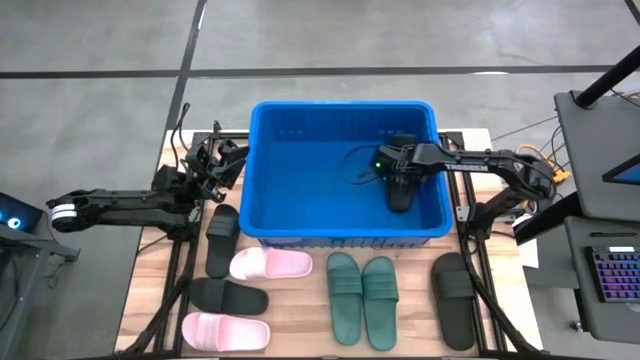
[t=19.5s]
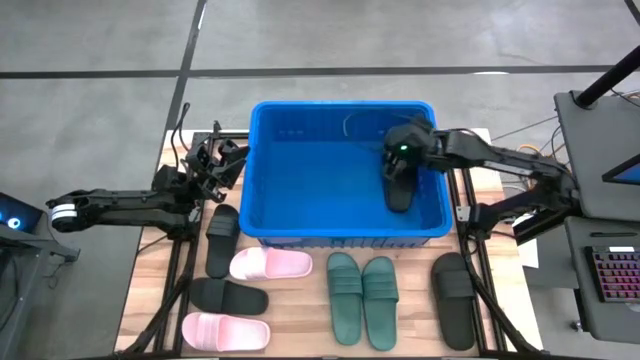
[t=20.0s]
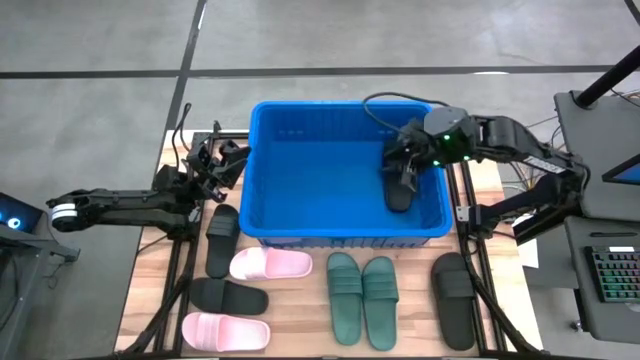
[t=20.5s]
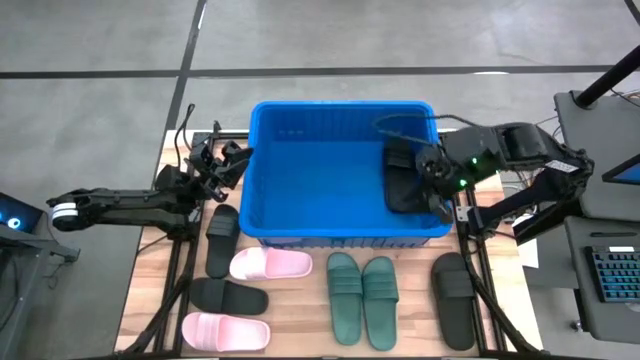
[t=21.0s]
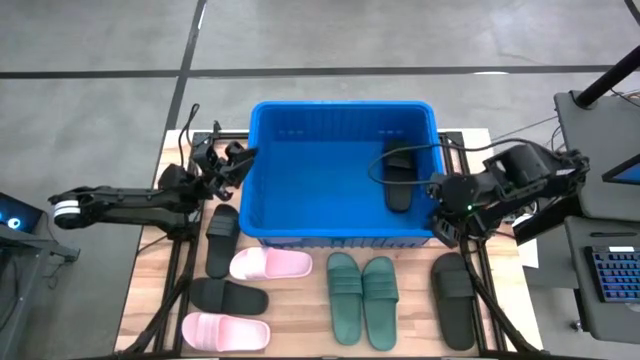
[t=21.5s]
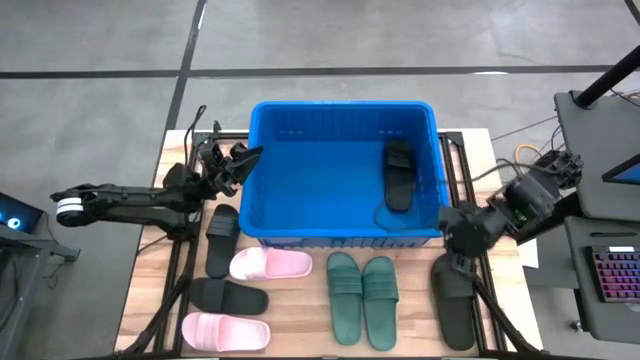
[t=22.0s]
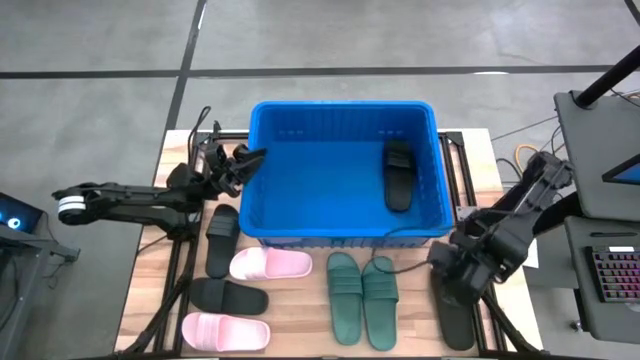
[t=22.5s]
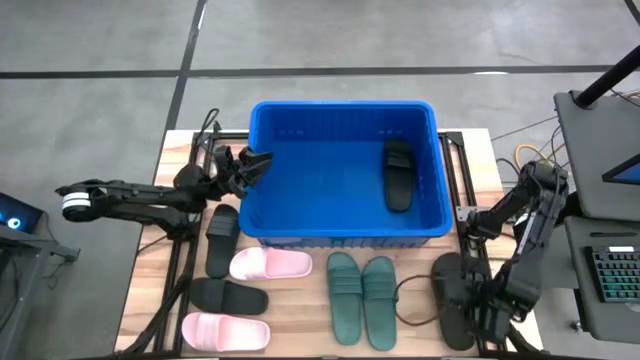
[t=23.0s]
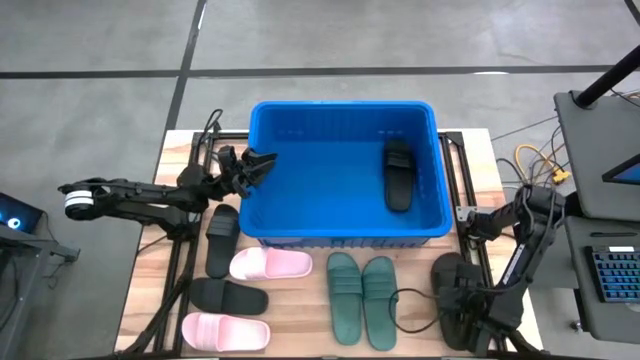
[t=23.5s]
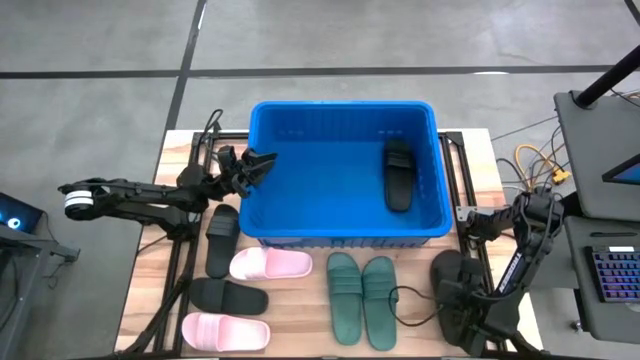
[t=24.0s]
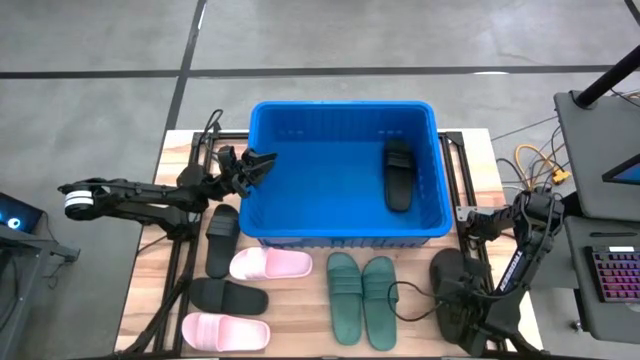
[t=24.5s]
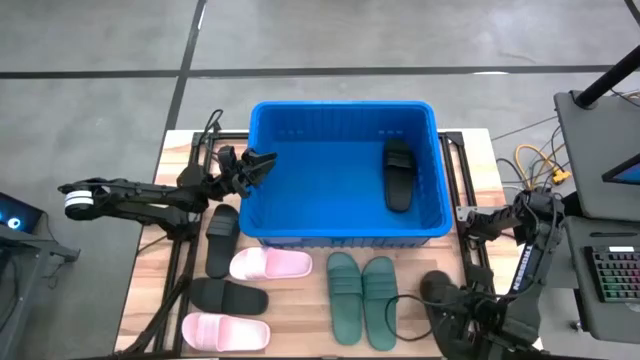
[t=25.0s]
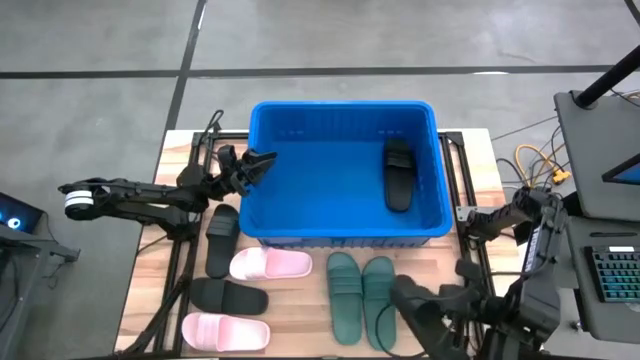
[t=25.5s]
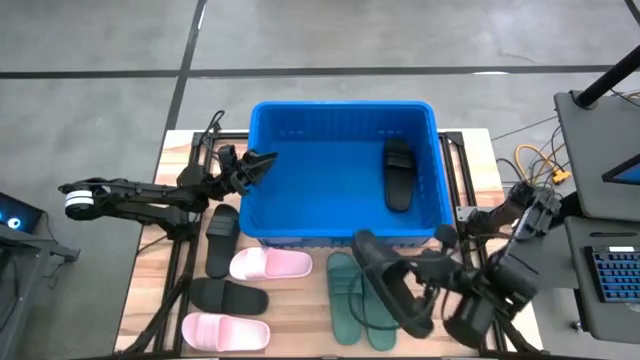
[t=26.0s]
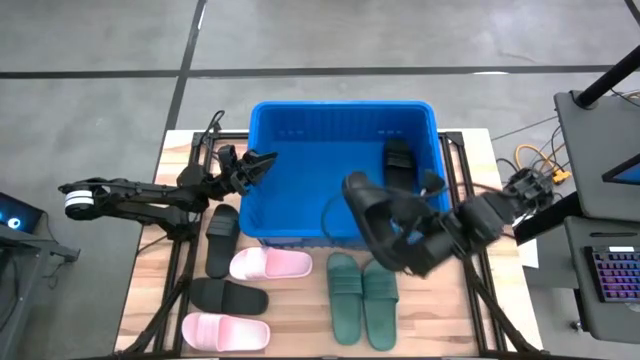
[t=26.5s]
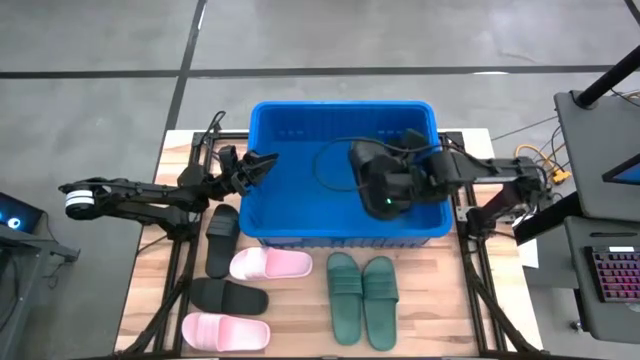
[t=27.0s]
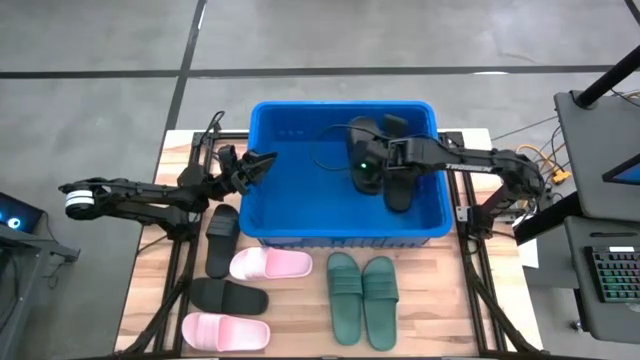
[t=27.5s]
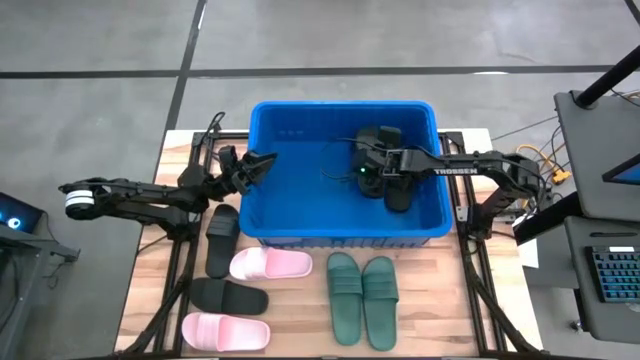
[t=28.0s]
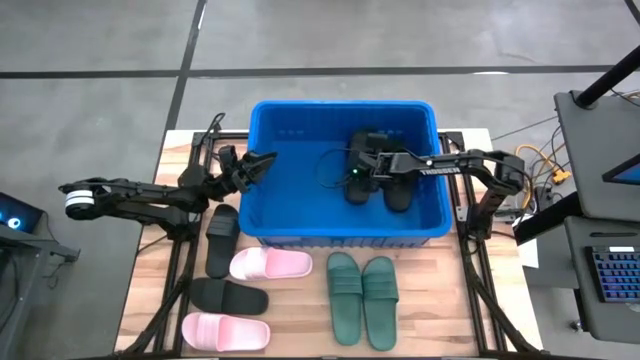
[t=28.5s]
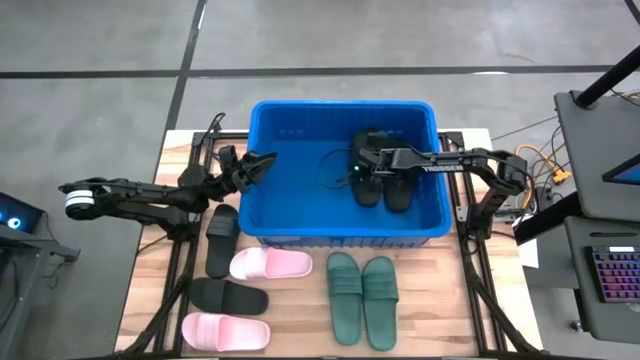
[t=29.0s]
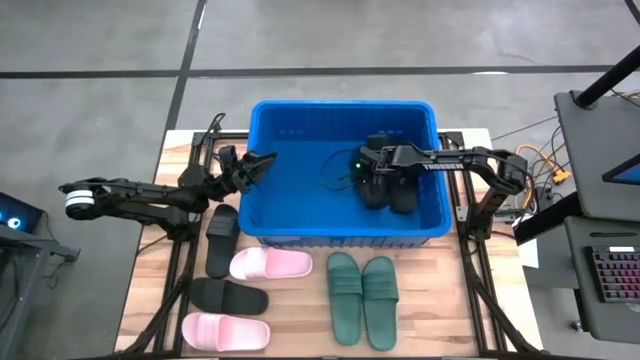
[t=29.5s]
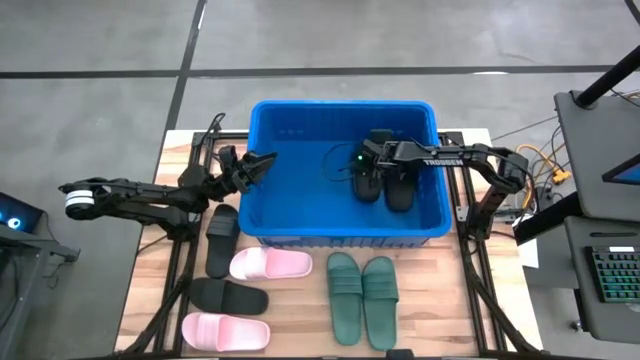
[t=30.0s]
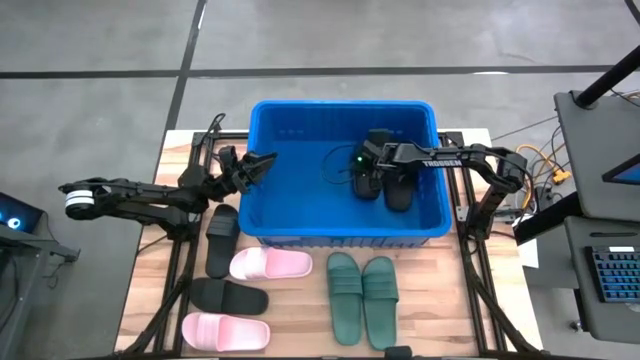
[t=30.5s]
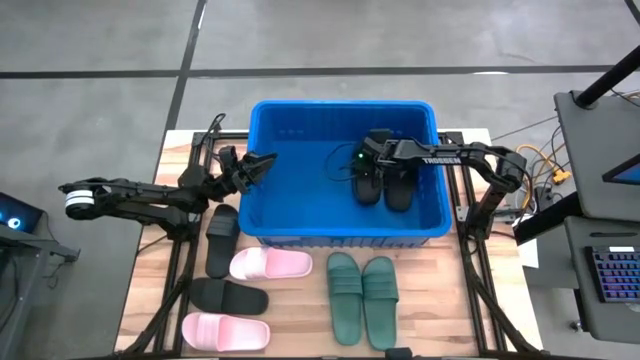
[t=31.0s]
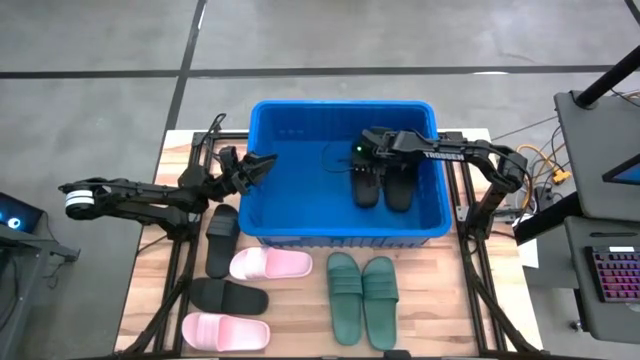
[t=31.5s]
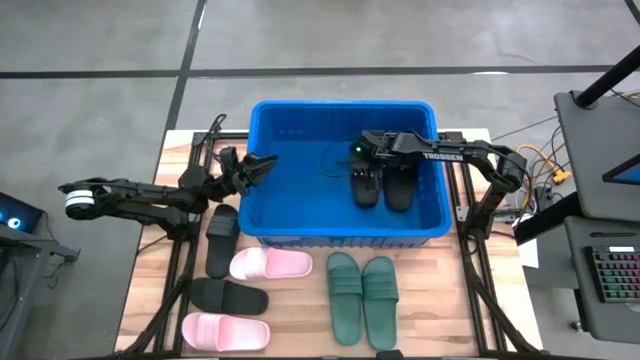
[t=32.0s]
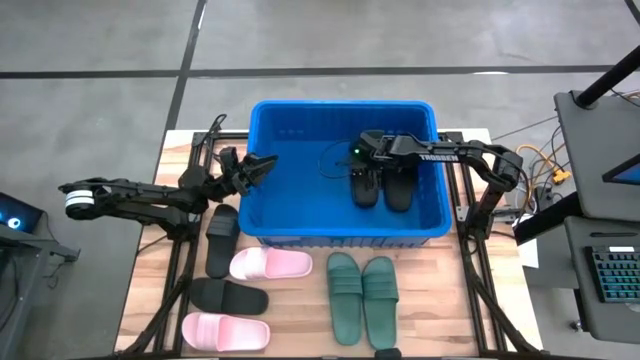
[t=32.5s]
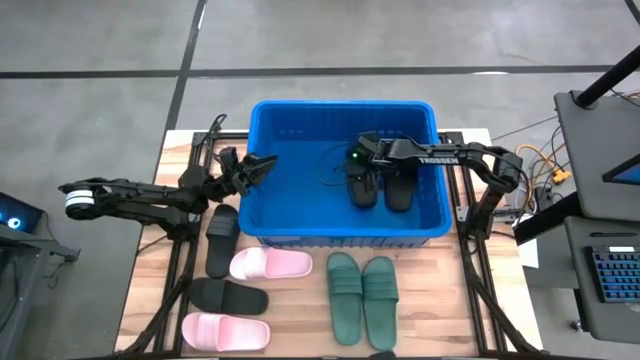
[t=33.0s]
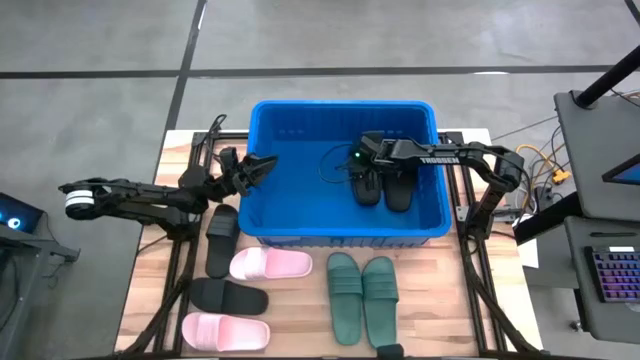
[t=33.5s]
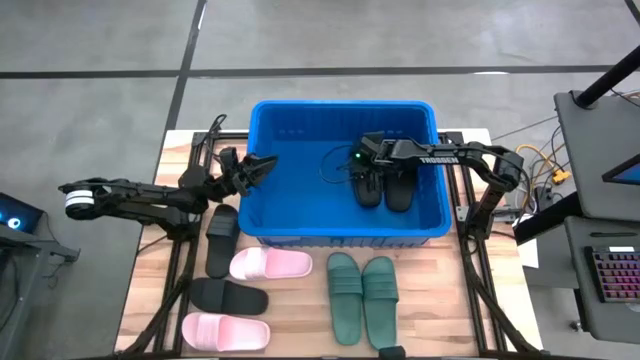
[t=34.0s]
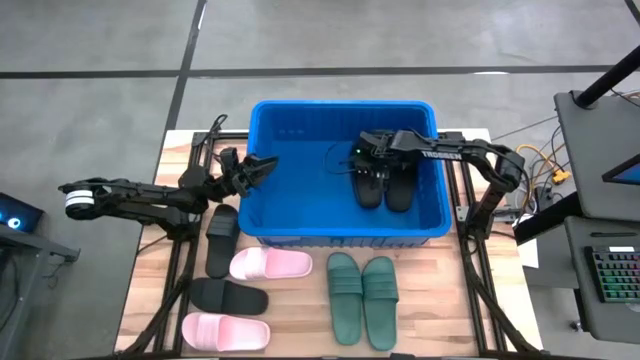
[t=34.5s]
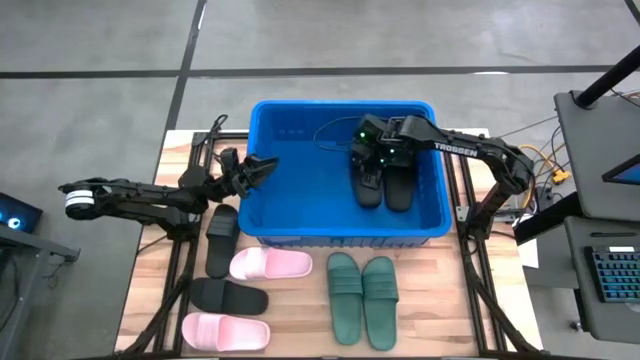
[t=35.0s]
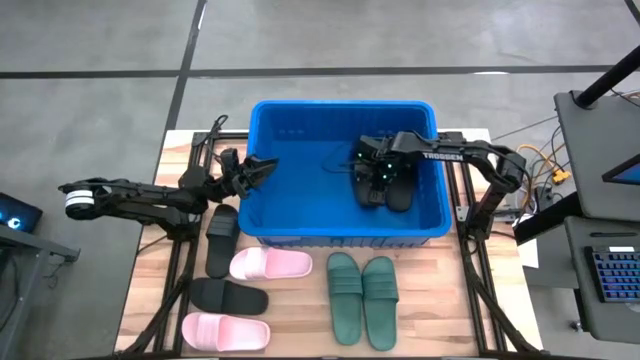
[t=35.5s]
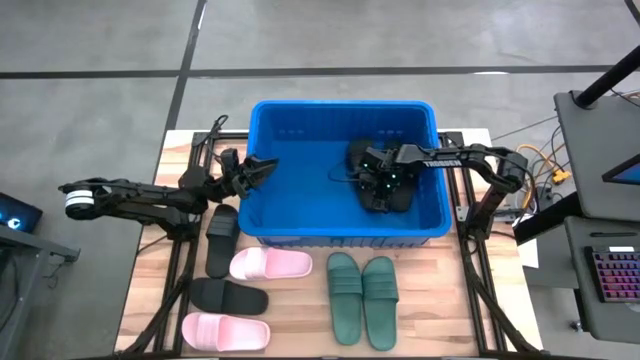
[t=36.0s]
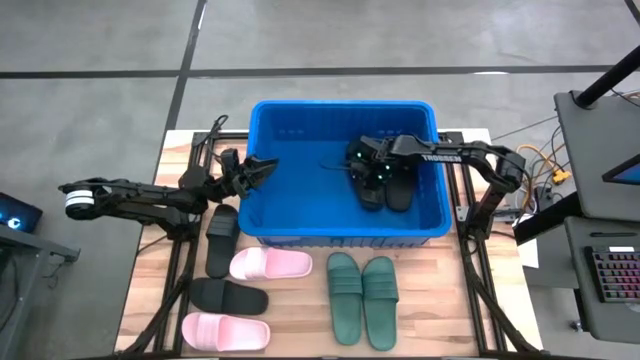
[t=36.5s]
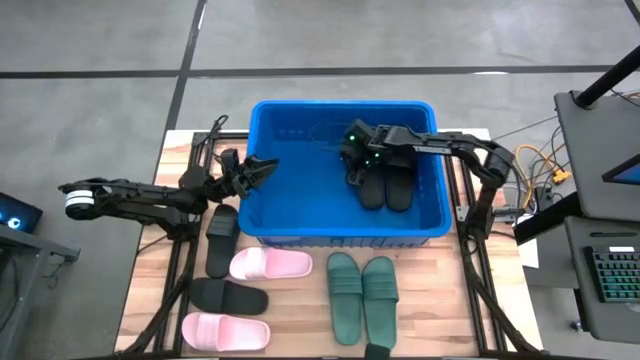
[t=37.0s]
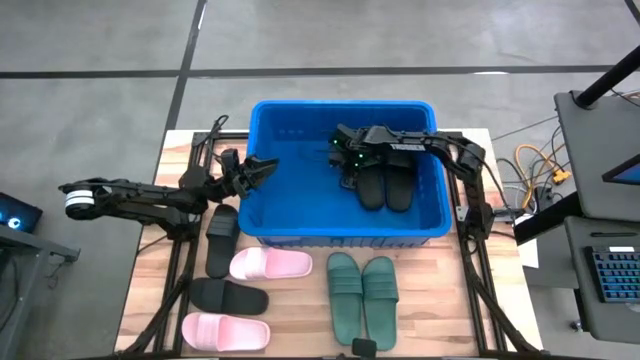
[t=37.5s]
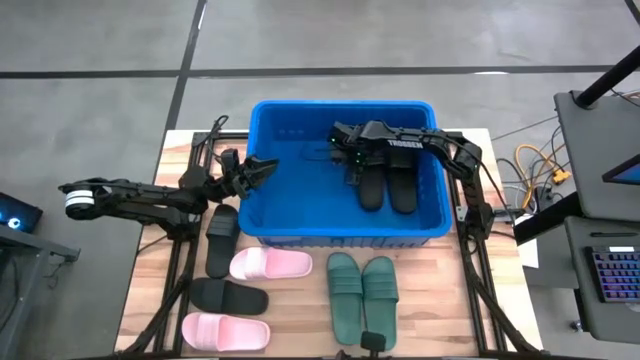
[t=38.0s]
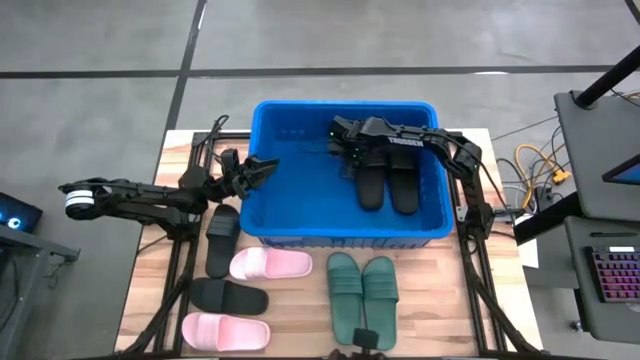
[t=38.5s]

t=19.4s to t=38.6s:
Task: Pick and place slides into bin
Put the black slide into the blue container
